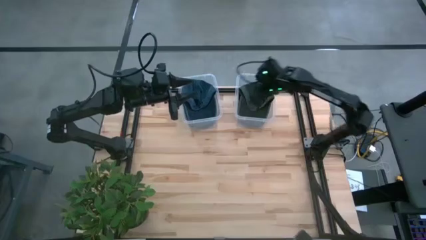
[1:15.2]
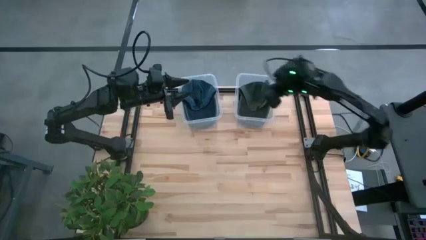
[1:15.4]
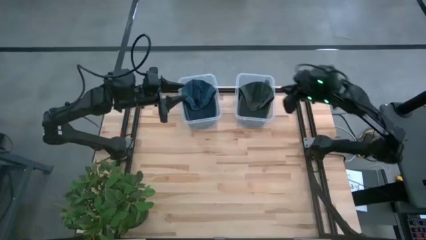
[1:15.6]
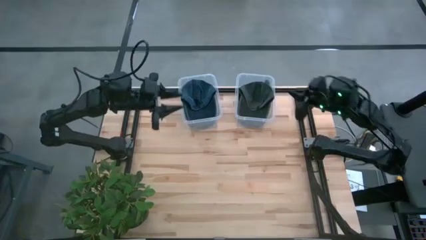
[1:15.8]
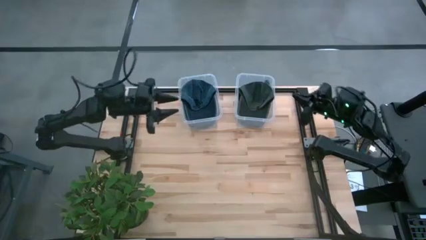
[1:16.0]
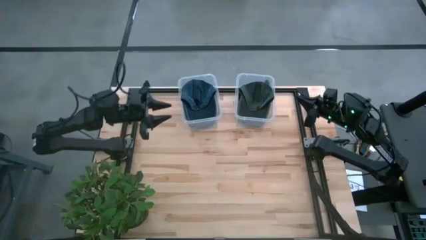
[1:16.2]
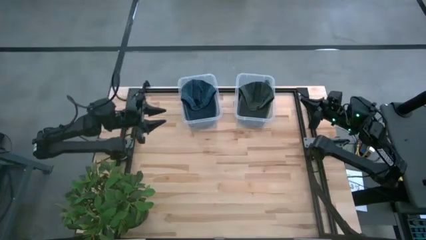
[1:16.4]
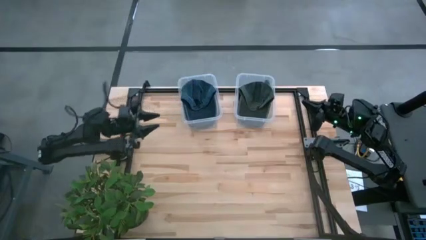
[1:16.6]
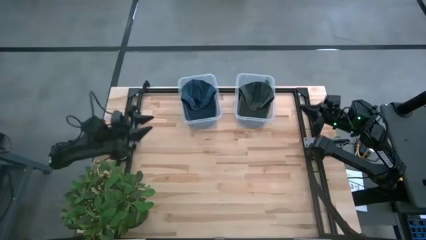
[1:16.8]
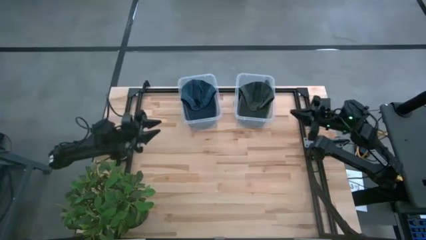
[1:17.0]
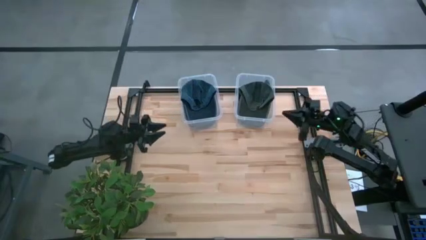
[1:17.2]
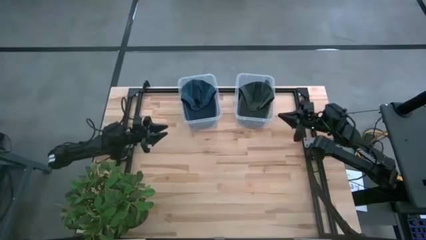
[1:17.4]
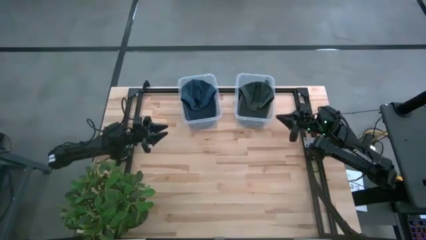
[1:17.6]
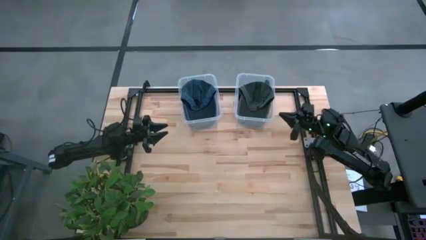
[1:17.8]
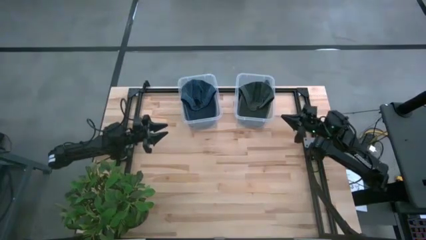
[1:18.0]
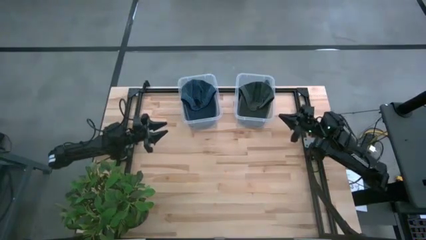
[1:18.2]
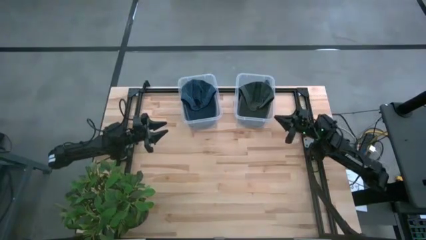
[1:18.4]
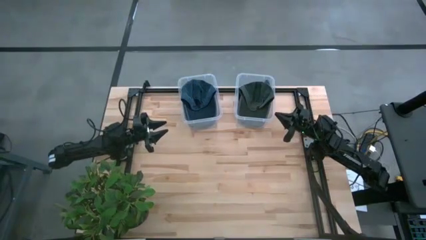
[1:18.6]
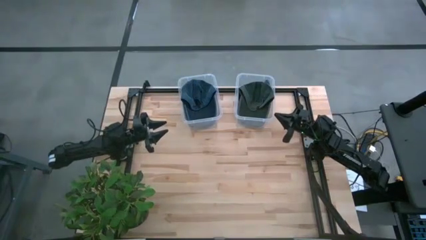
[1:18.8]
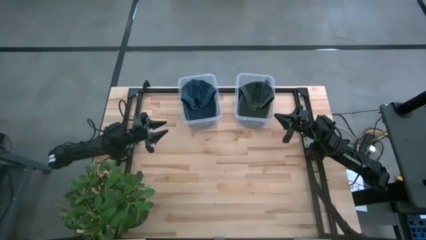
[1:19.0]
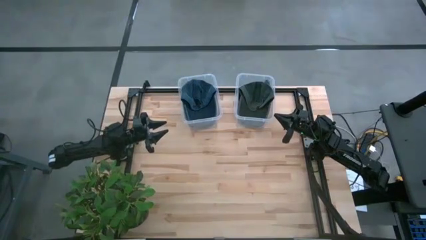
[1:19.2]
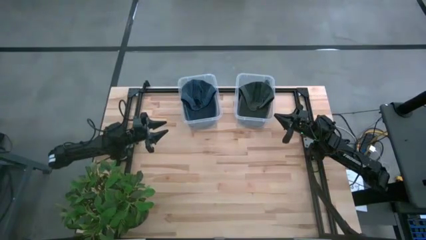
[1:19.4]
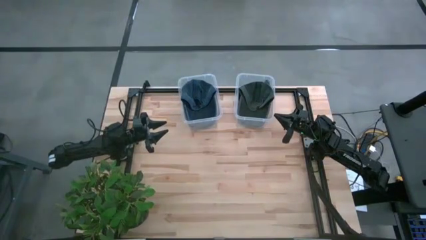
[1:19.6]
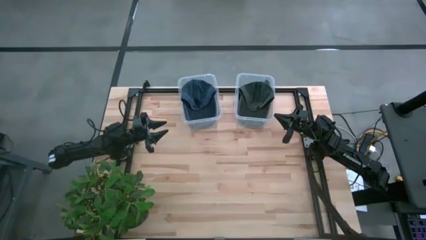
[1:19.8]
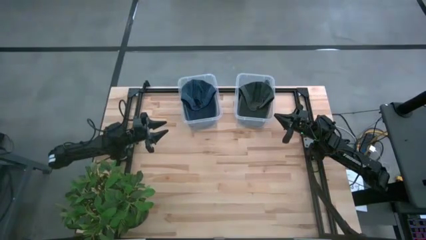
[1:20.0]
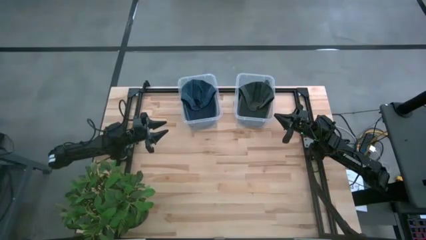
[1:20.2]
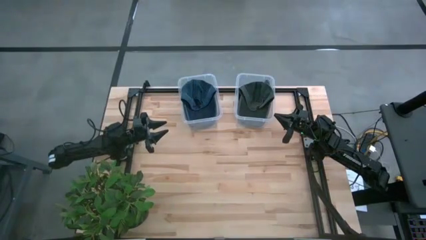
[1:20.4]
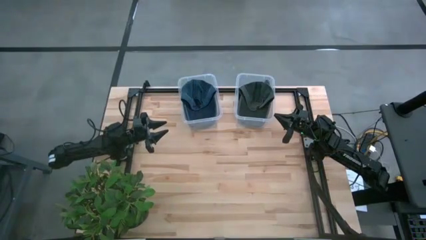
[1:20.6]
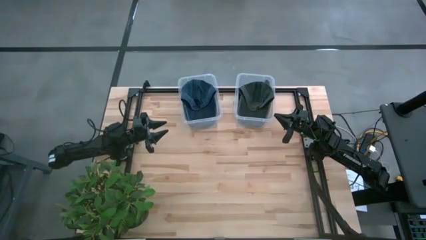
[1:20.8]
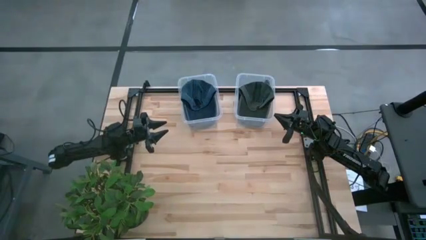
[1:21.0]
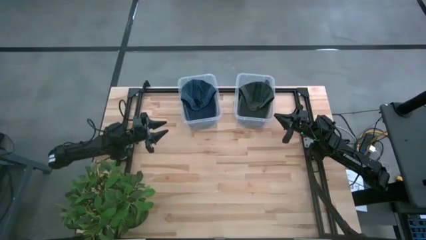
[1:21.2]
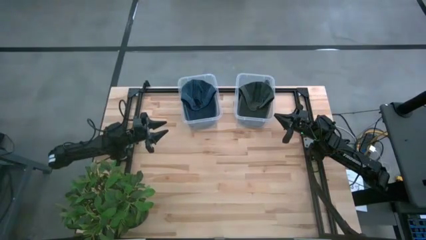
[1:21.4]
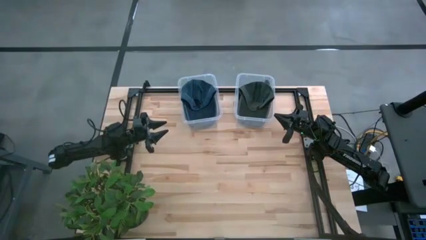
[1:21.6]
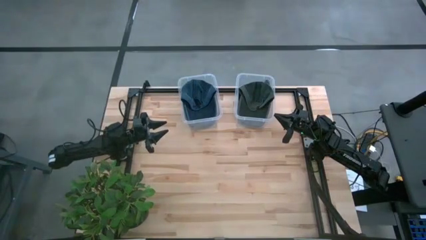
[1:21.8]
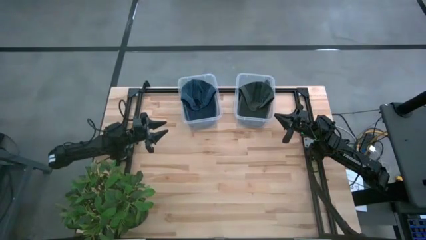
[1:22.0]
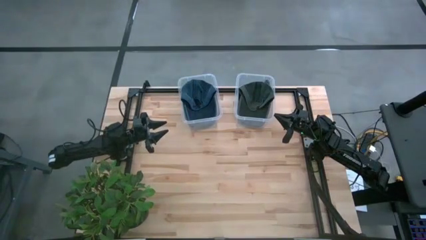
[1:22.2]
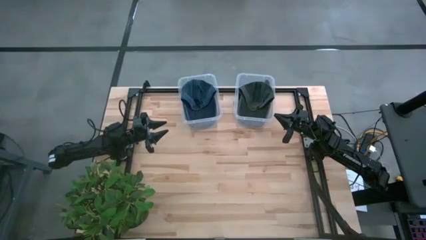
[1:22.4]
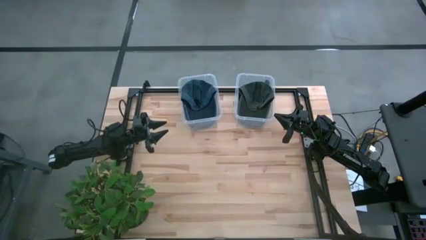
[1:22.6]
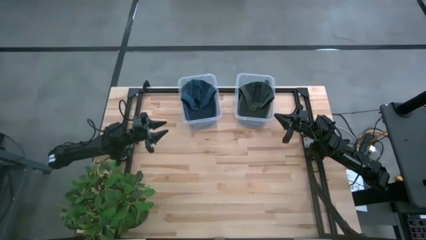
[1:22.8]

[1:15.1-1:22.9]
Task: Pick & Place hat
Return to Home Position

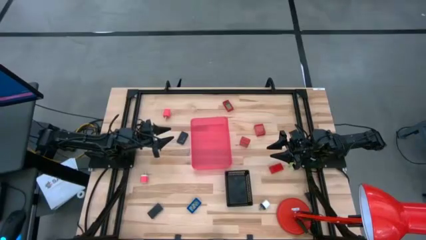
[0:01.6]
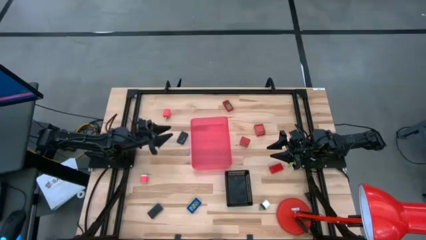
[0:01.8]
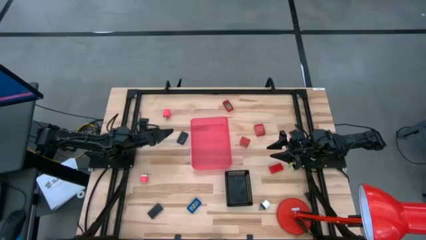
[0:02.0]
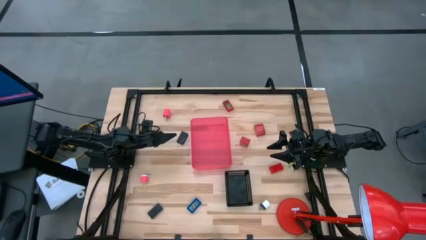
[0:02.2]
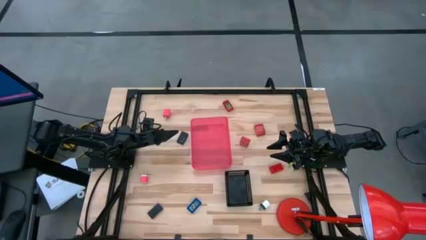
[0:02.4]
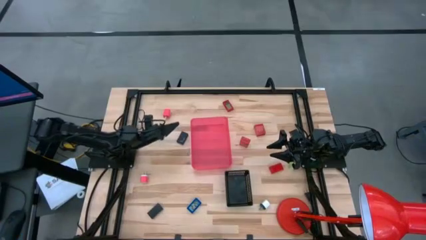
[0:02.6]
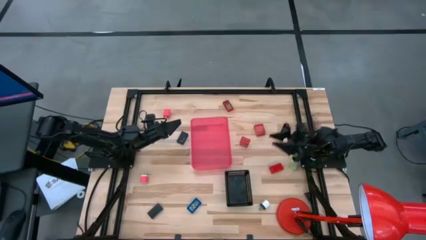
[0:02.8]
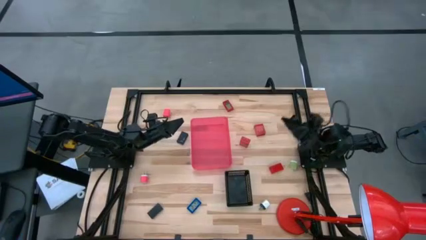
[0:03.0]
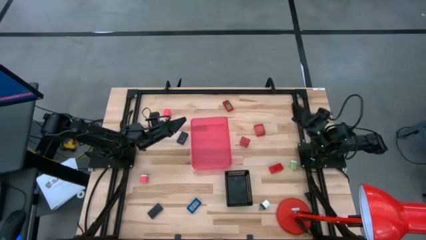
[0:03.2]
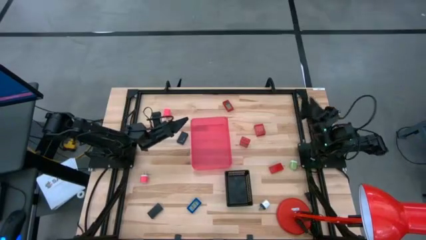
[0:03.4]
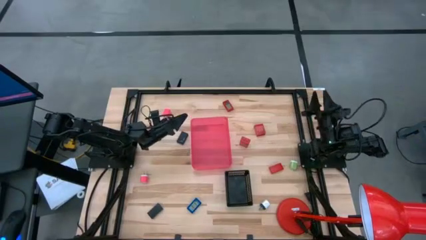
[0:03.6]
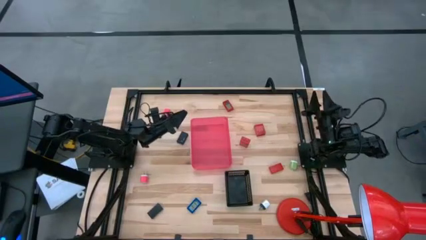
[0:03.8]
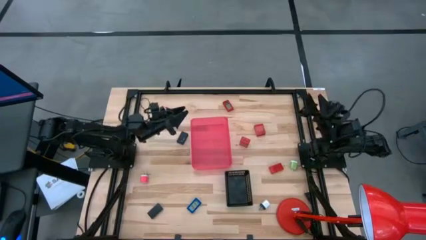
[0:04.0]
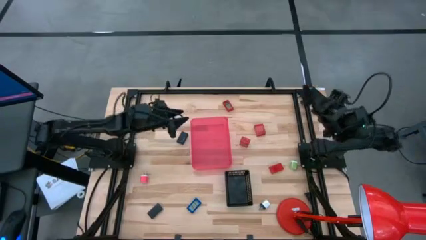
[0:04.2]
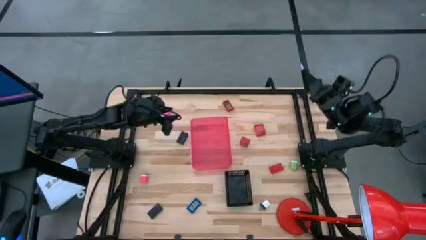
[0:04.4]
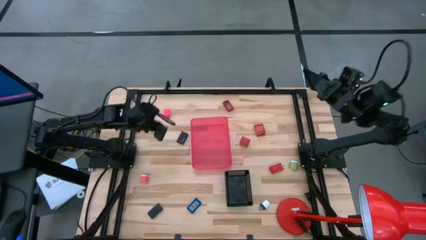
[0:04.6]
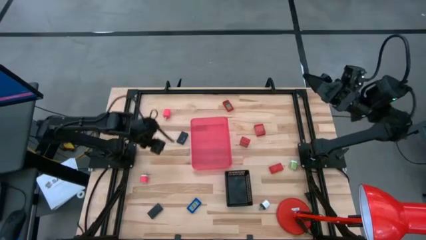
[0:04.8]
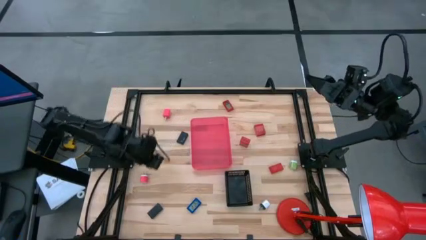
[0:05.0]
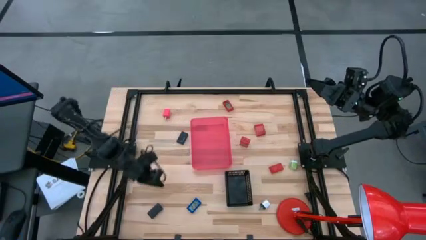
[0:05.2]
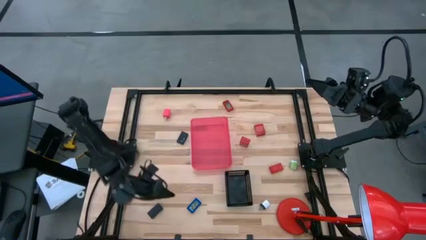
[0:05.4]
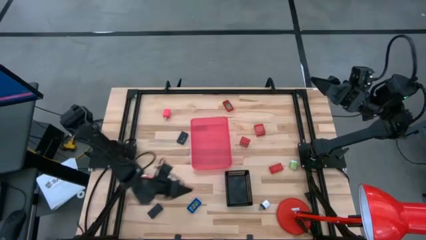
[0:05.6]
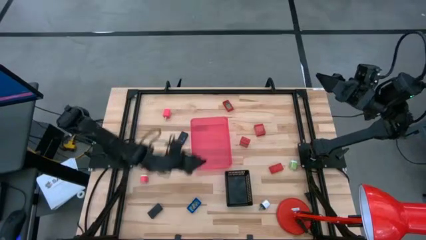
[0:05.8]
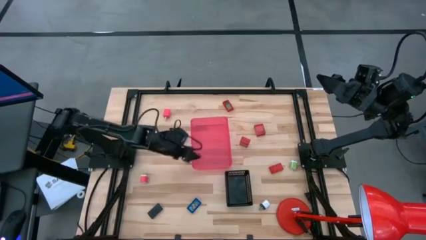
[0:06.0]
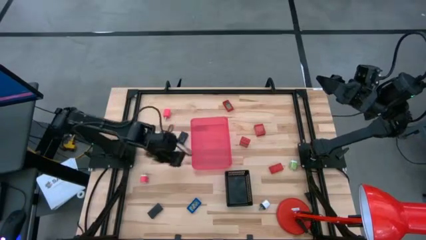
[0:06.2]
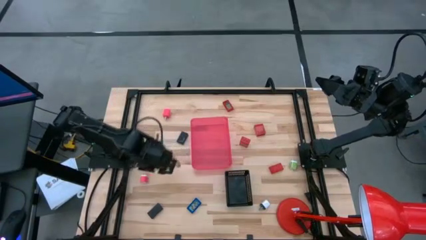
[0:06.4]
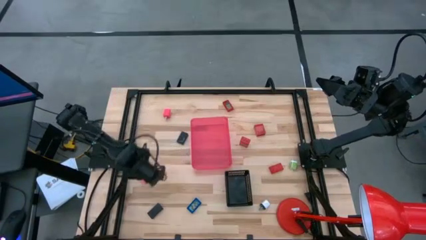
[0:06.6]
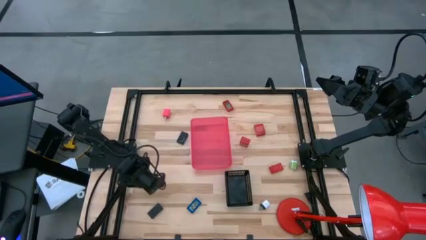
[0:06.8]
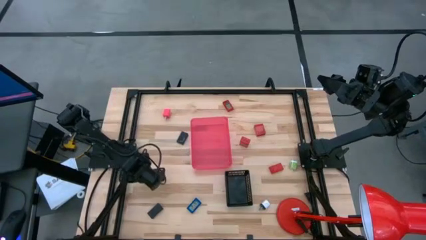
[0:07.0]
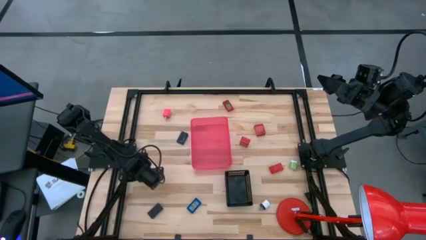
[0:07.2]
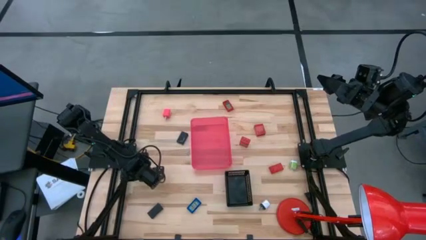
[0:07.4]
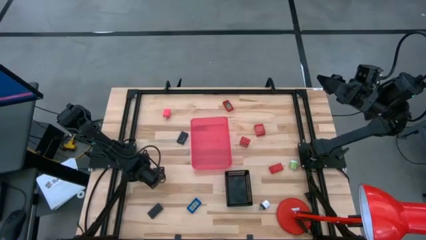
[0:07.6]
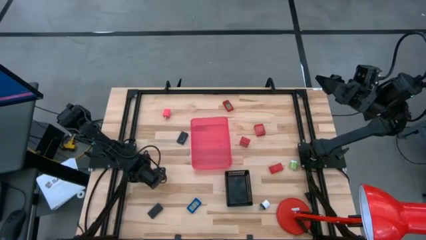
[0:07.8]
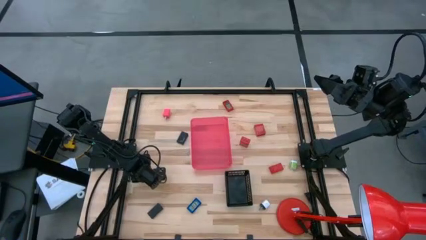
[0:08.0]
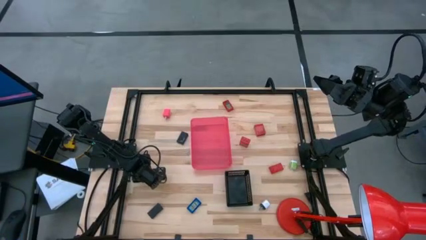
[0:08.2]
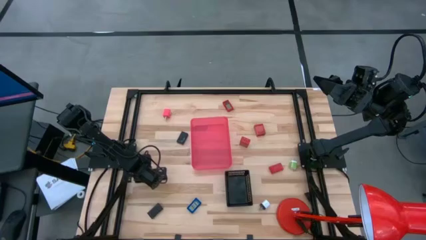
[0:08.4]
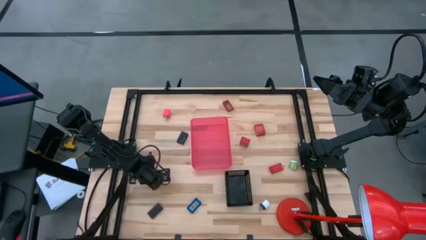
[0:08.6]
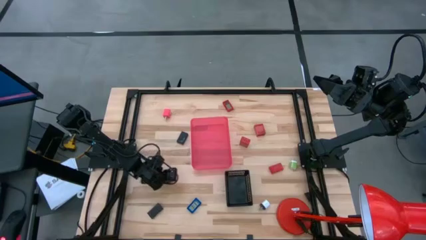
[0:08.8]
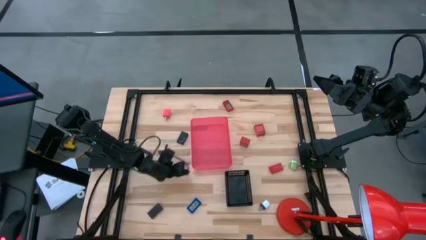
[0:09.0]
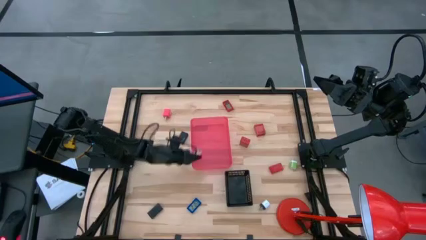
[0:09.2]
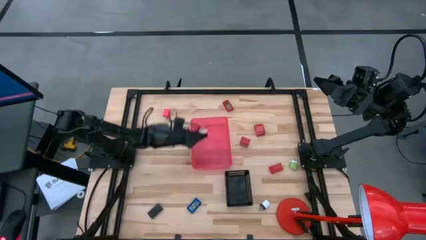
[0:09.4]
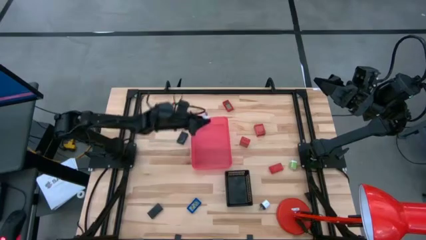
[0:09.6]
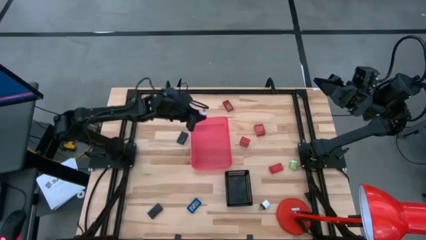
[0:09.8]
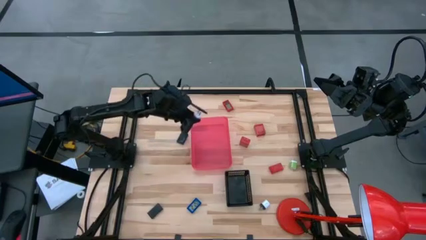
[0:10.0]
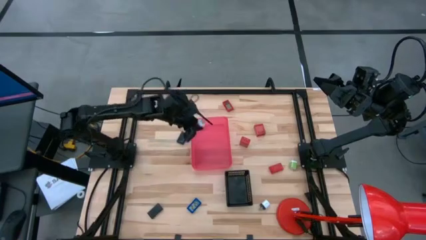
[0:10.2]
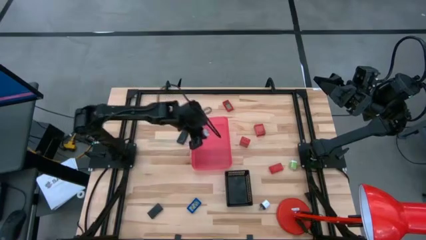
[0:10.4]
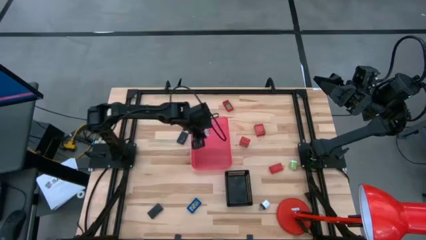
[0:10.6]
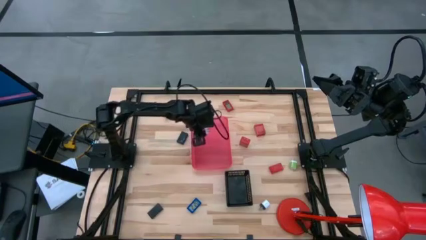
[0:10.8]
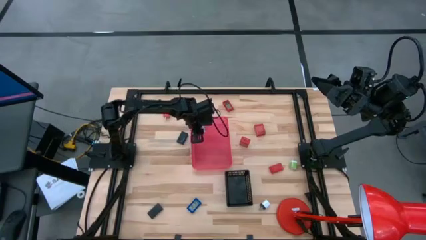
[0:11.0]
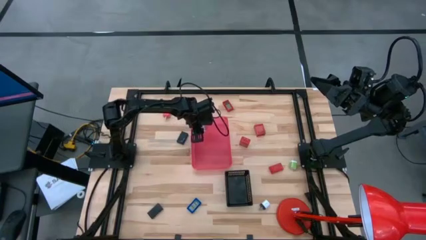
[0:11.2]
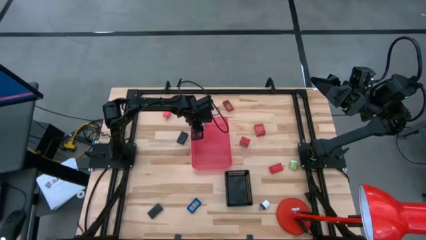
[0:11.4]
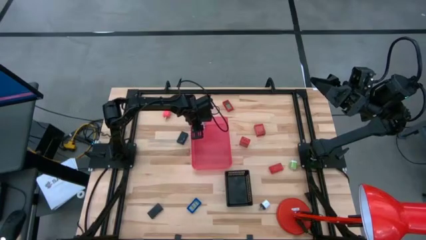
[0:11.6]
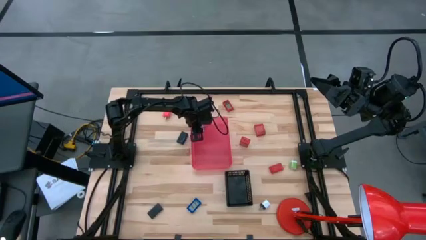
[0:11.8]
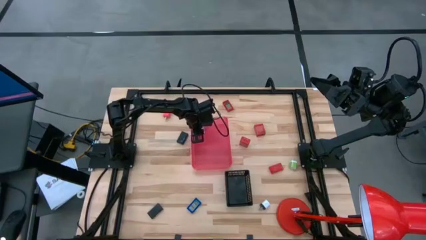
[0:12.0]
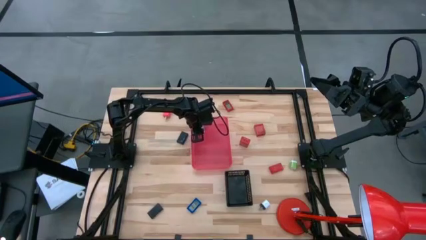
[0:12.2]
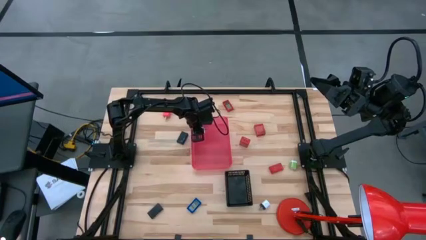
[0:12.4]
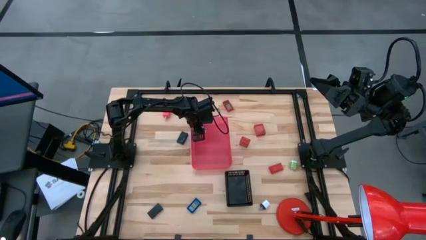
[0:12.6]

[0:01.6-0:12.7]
Task: Pick & Place Office items
Put the light pink charger adapter into the pink bin
